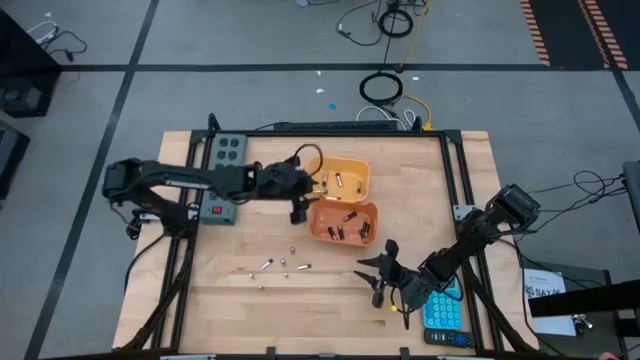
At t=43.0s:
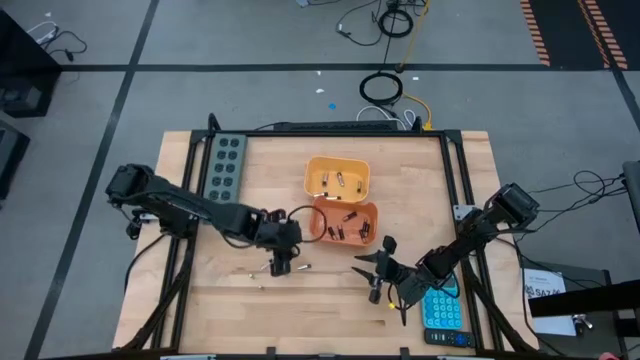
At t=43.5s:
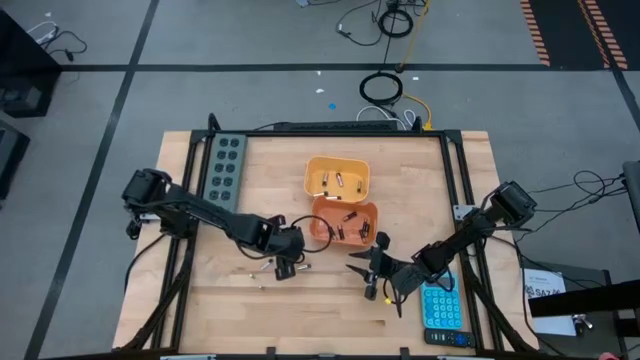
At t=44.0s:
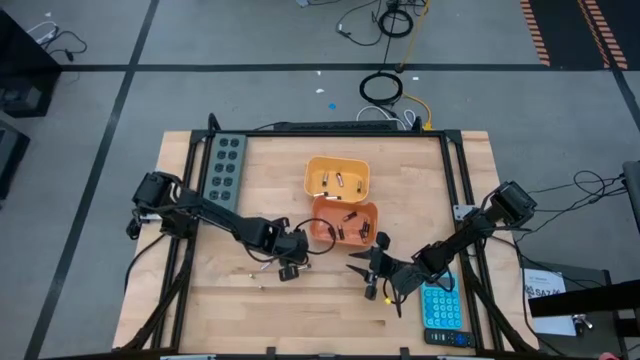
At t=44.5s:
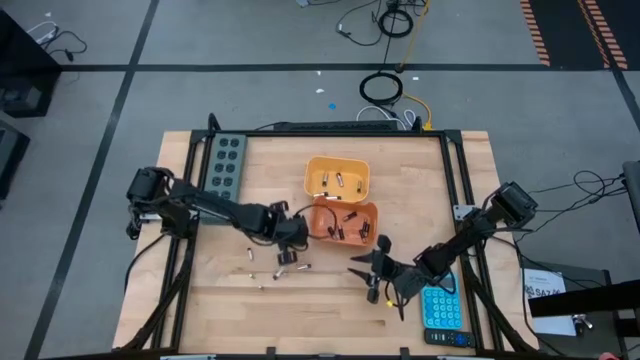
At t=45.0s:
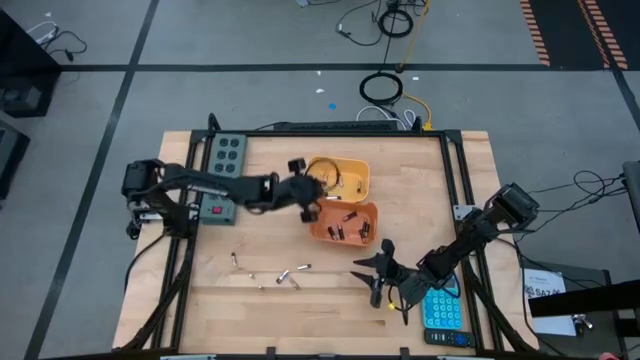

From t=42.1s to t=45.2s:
Task: Sort batteries
Put the silver battery into the yellow bin

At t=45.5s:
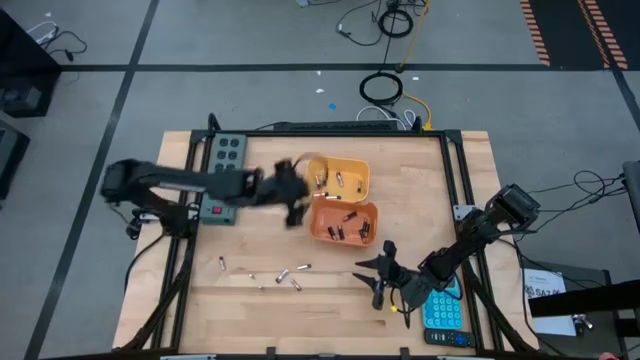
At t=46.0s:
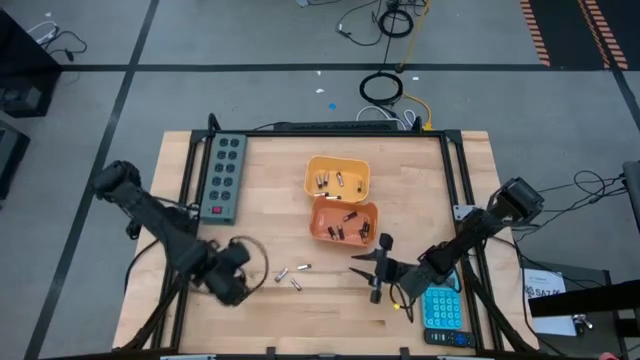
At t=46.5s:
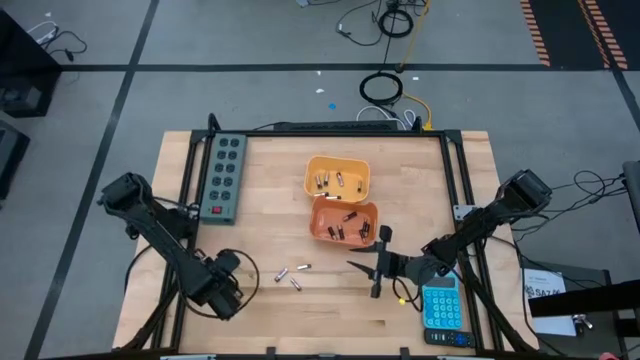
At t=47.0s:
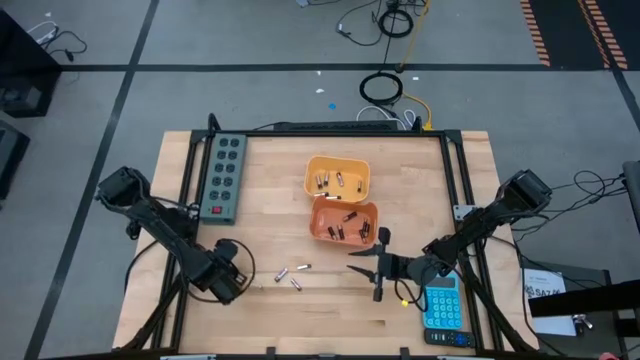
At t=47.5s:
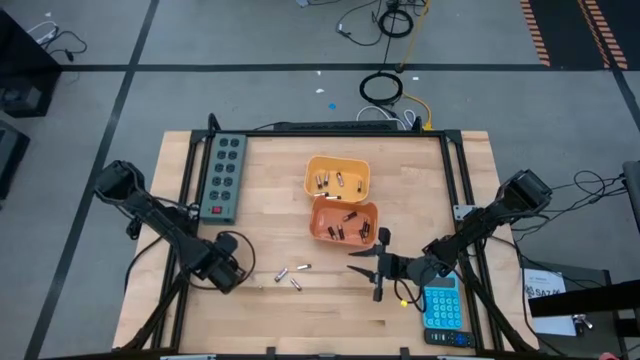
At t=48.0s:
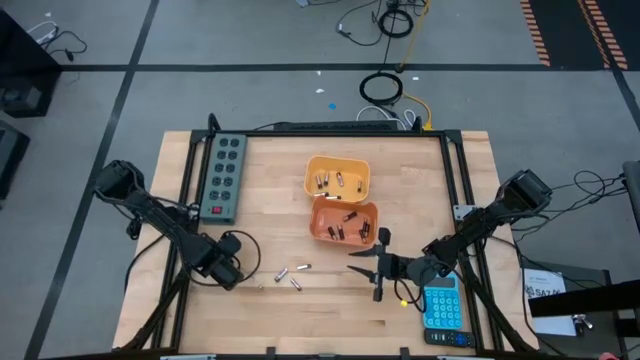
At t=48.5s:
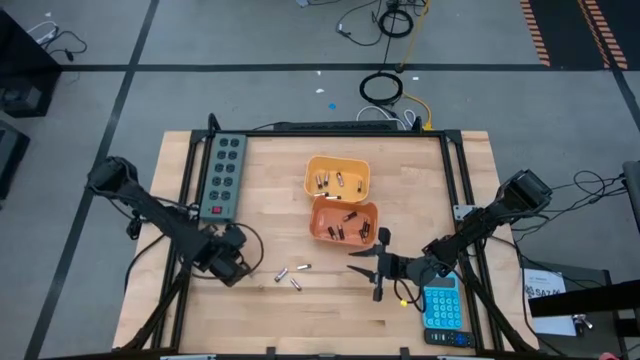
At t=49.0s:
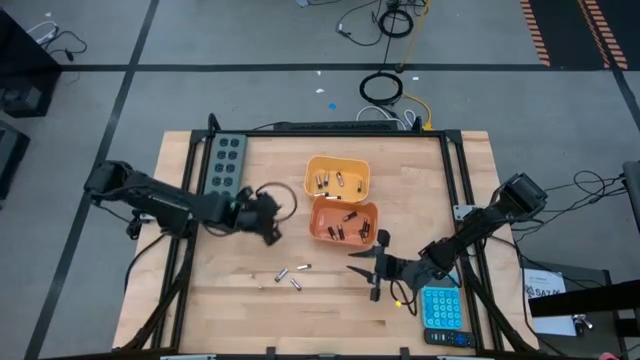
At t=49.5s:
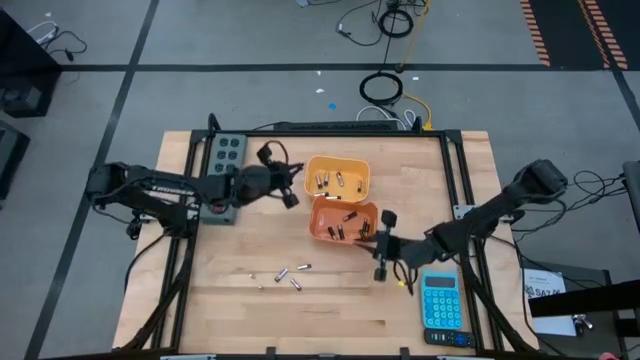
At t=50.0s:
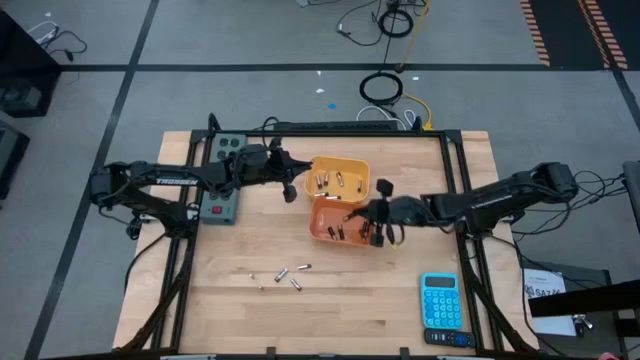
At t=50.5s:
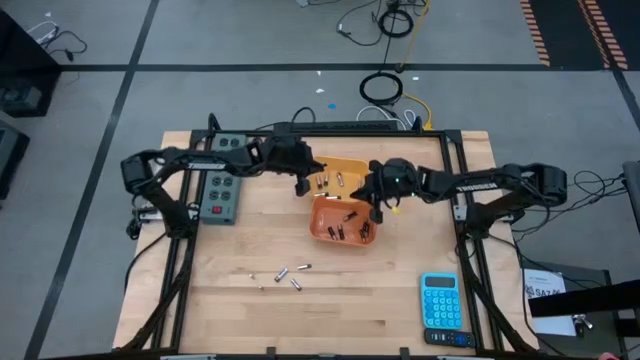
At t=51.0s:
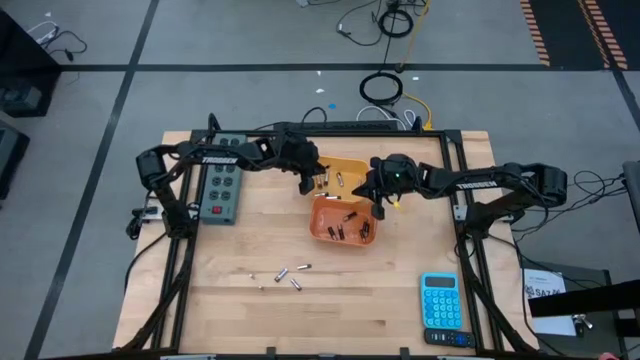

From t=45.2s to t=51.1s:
Put the silver battery into the yellow bin

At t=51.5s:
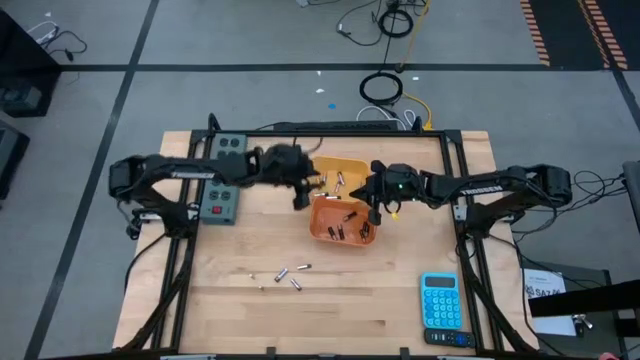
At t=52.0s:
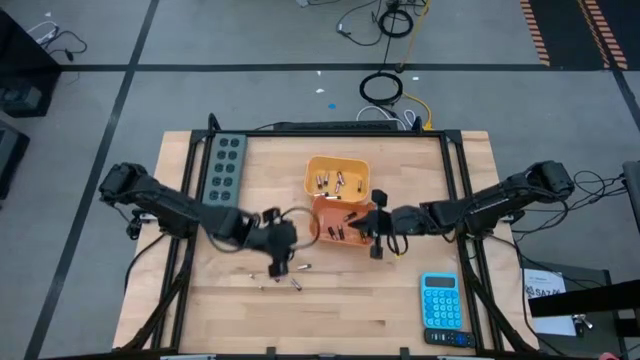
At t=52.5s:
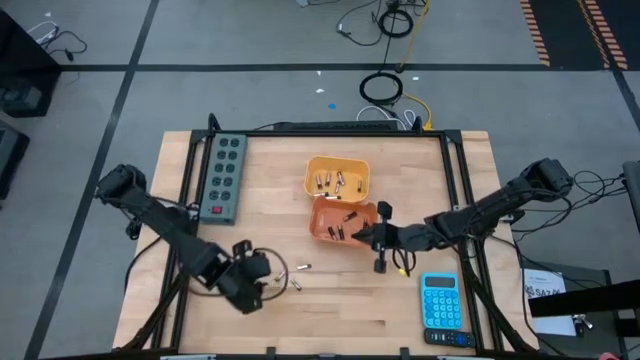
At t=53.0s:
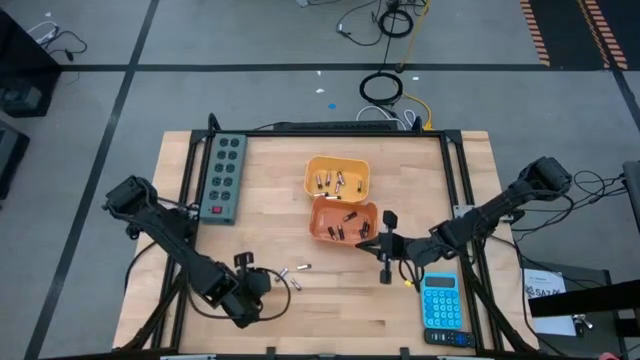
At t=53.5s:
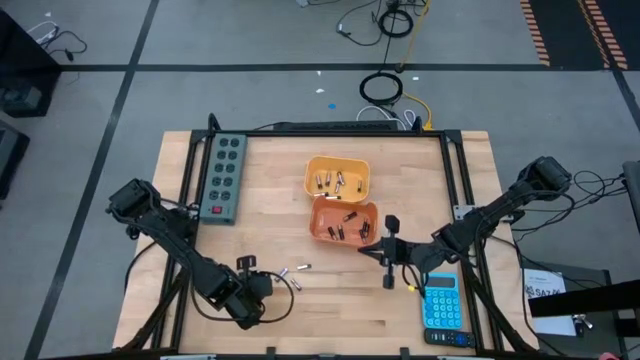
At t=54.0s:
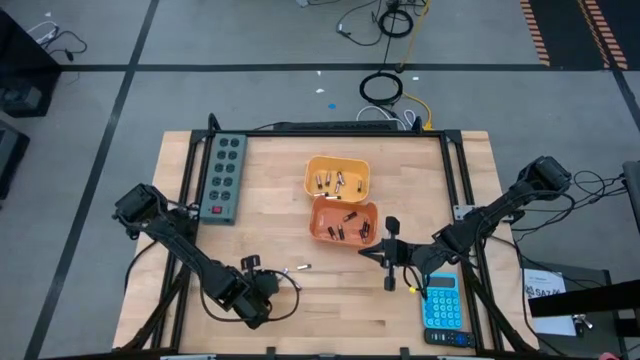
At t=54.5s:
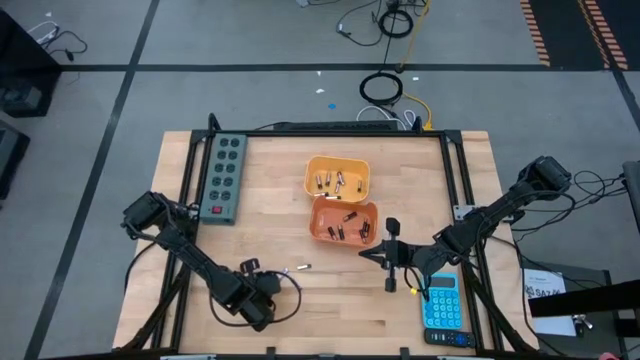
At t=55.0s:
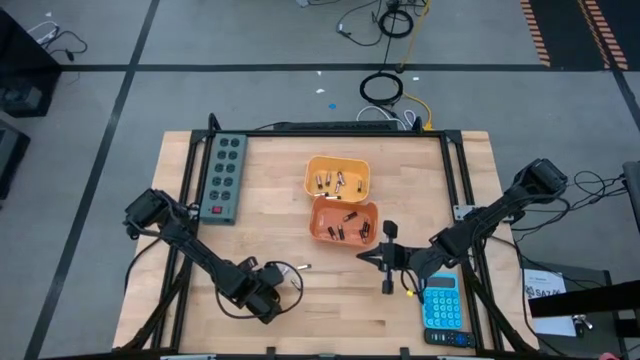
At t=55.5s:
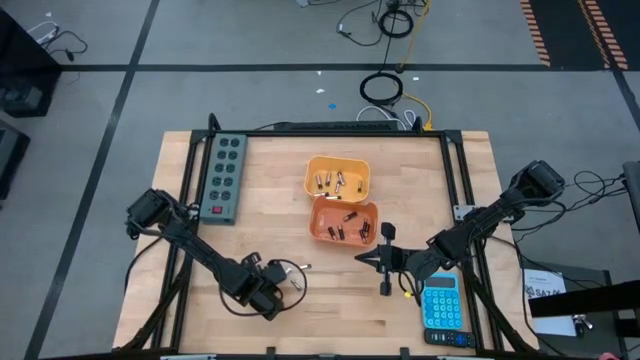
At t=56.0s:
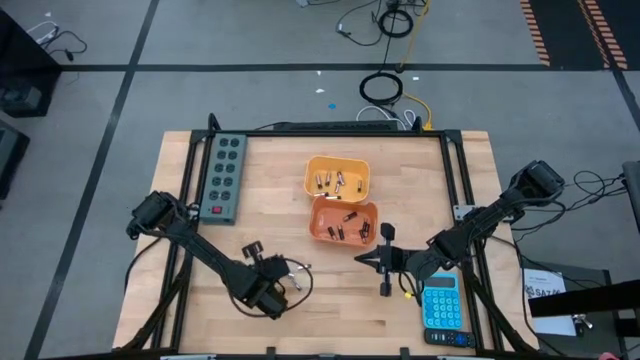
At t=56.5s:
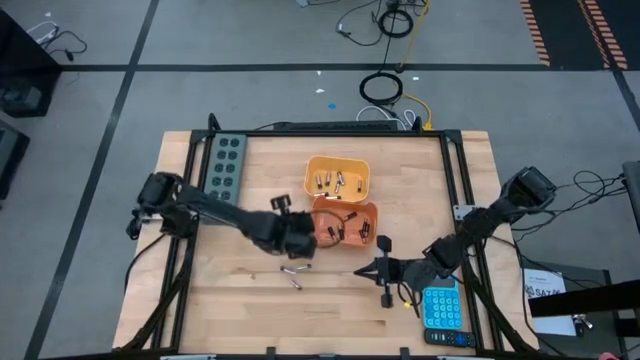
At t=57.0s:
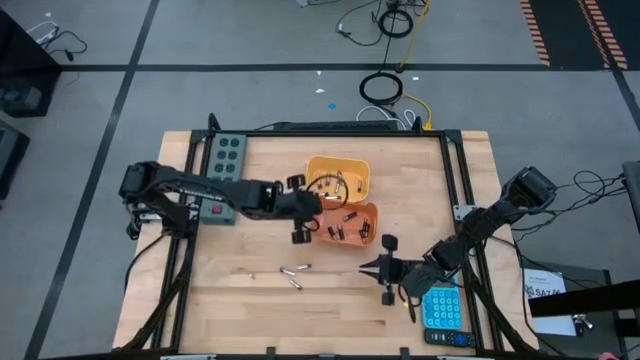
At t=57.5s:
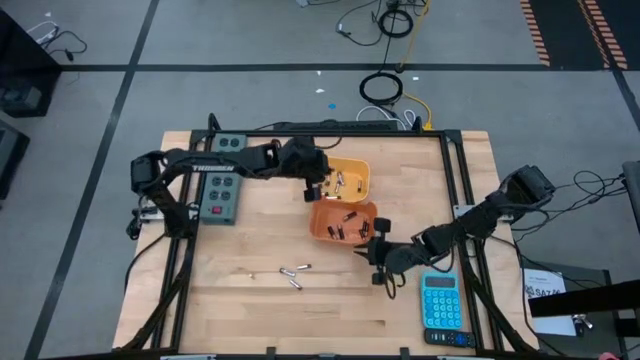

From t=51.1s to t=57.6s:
Put the silver battery into the yellow bin

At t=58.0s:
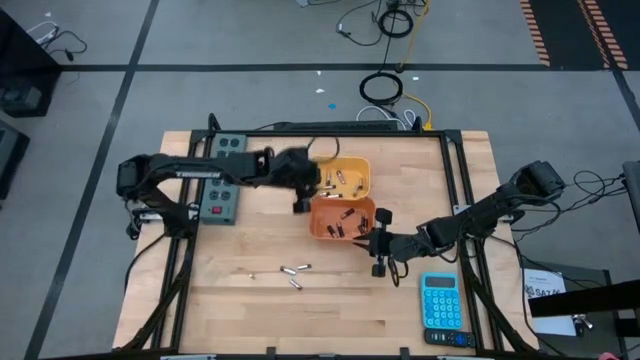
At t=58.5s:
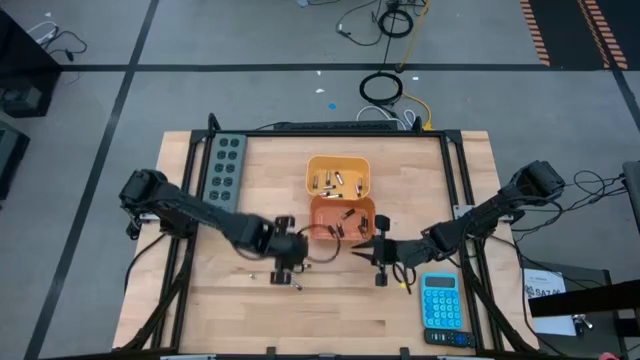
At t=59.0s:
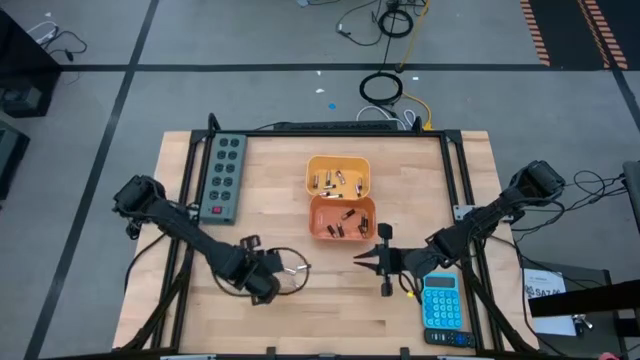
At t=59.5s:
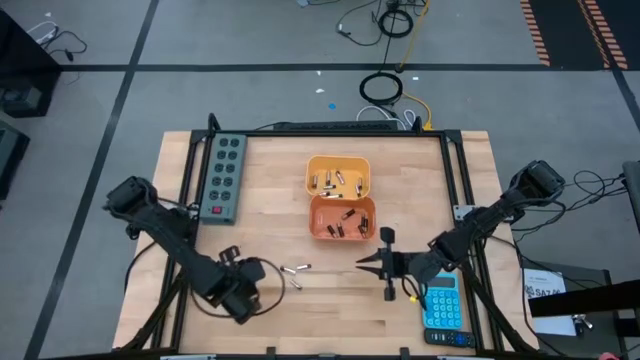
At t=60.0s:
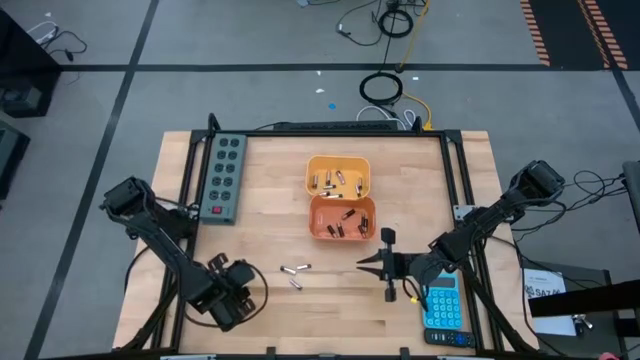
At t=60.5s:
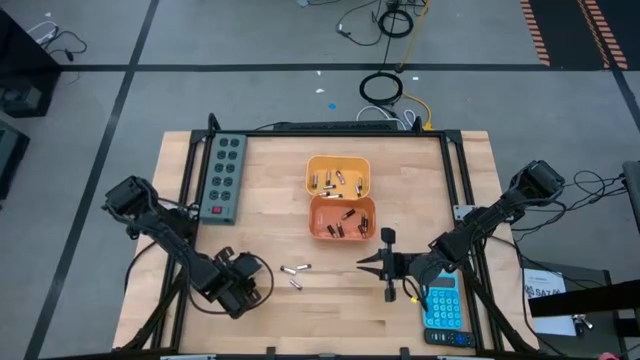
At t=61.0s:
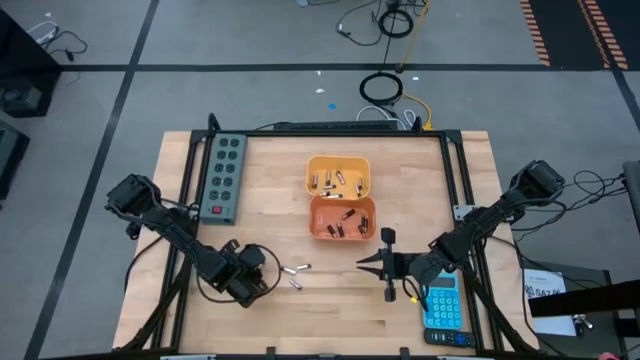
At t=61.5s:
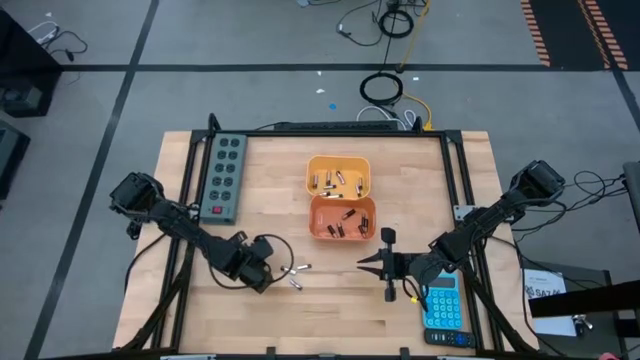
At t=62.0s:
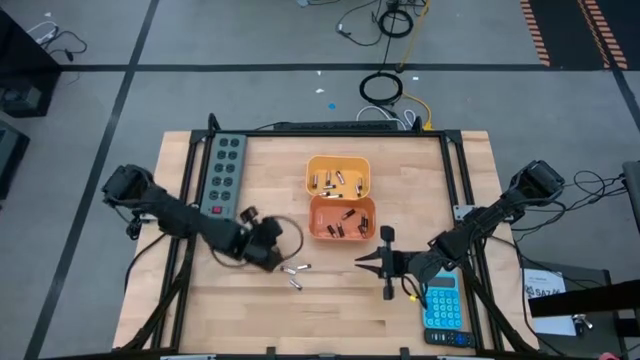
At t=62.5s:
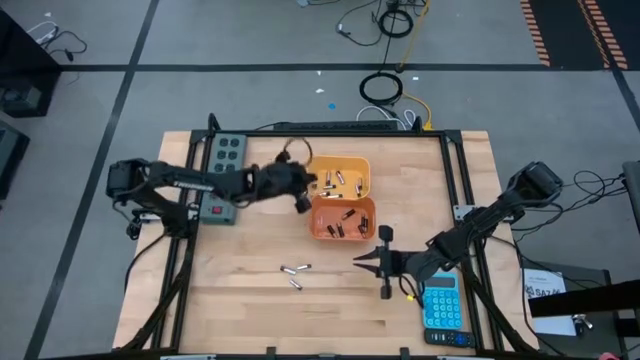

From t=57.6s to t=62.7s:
Put the silver battery into the yellow bin

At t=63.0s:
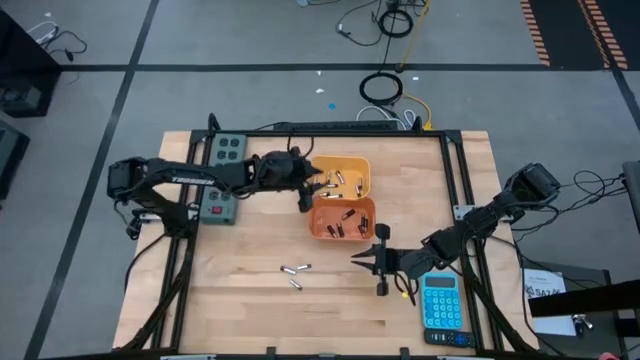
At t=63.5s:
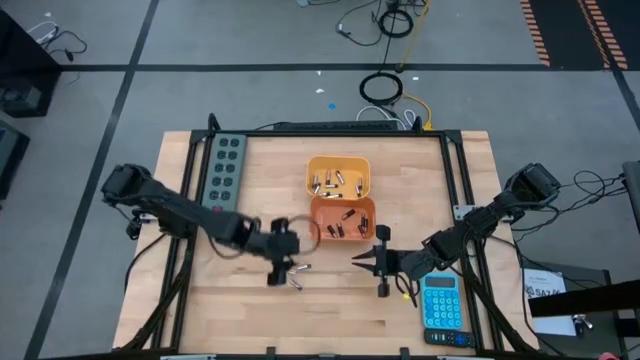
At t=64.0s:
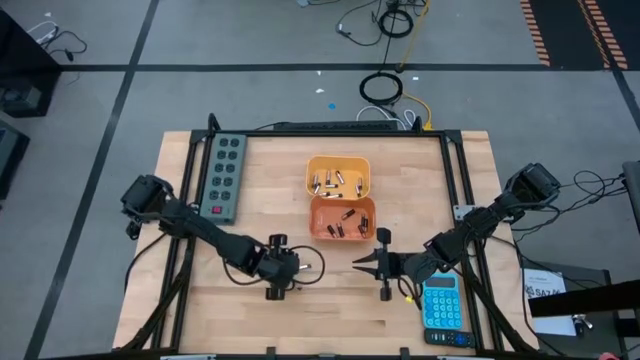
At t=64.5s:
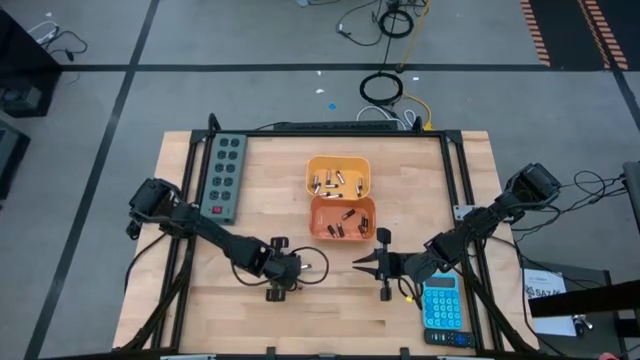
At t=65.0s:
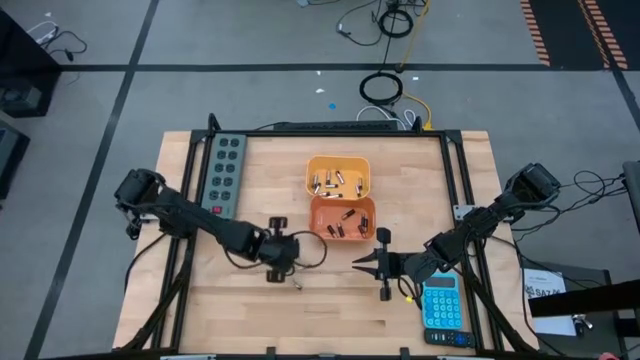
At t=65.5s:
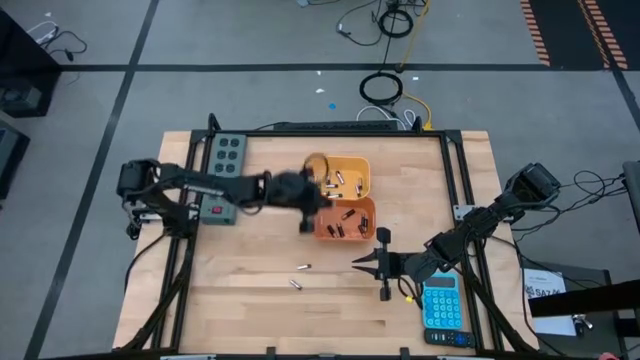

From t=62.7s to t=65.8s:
Put the silver battery into the yellow bin
